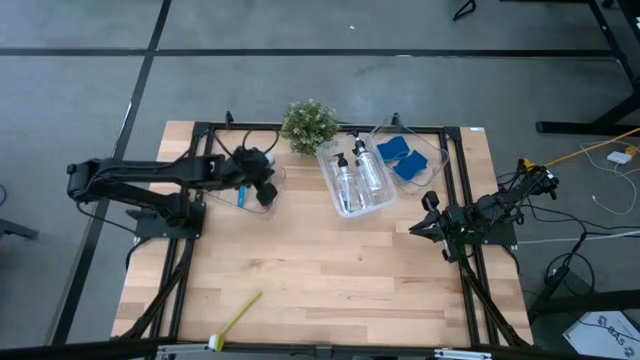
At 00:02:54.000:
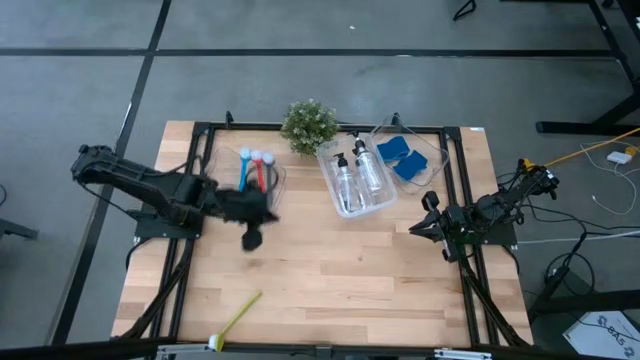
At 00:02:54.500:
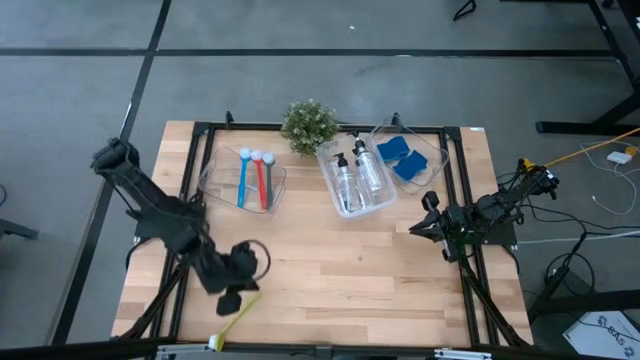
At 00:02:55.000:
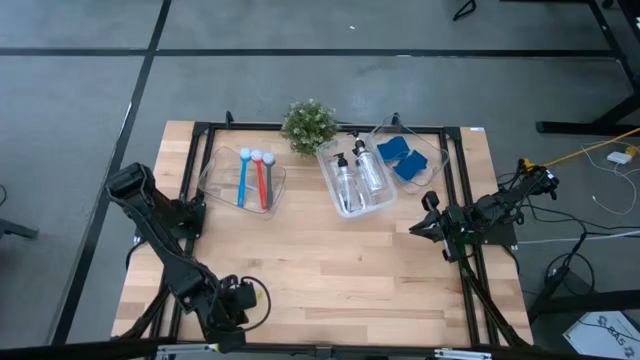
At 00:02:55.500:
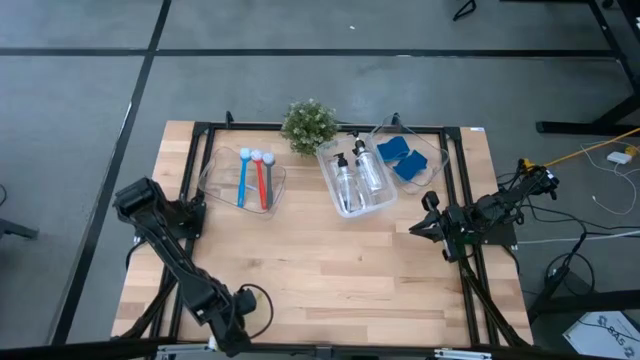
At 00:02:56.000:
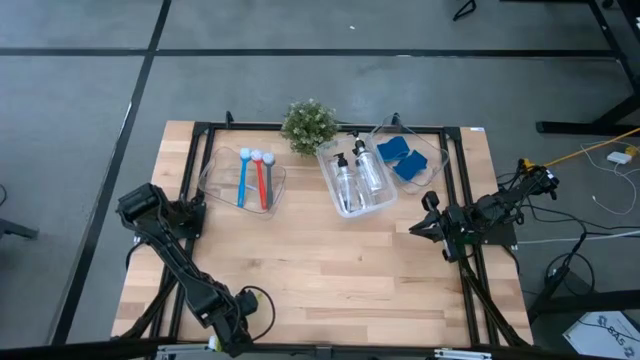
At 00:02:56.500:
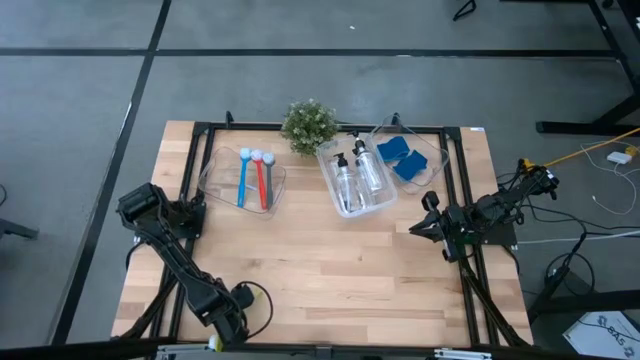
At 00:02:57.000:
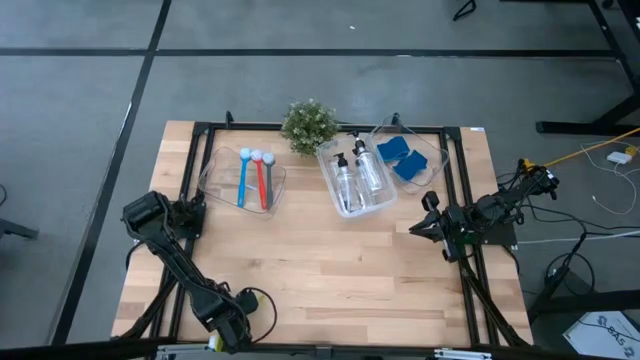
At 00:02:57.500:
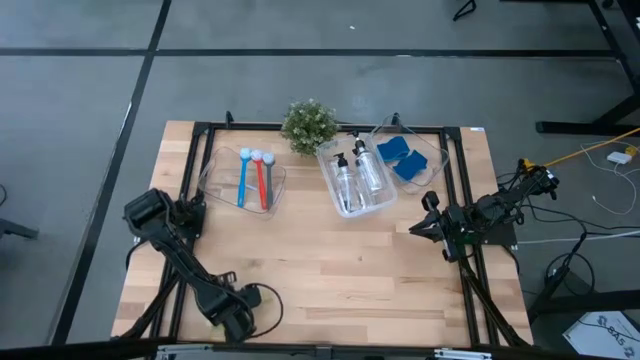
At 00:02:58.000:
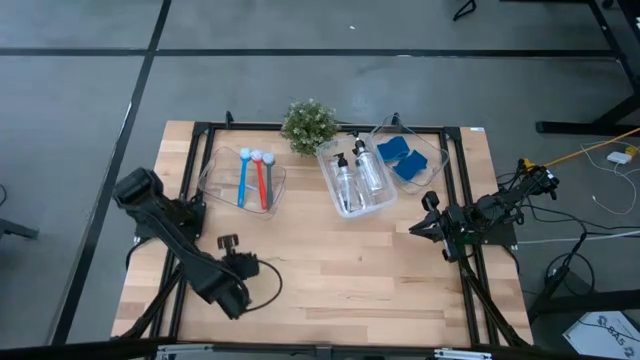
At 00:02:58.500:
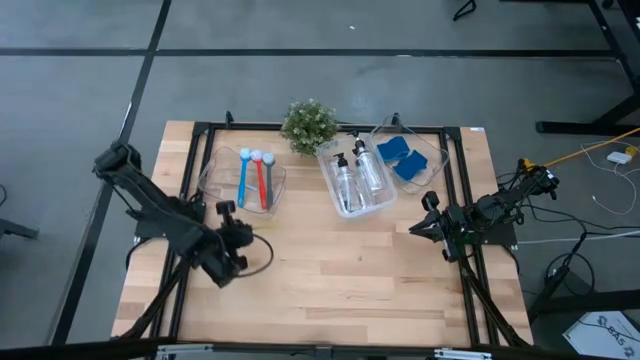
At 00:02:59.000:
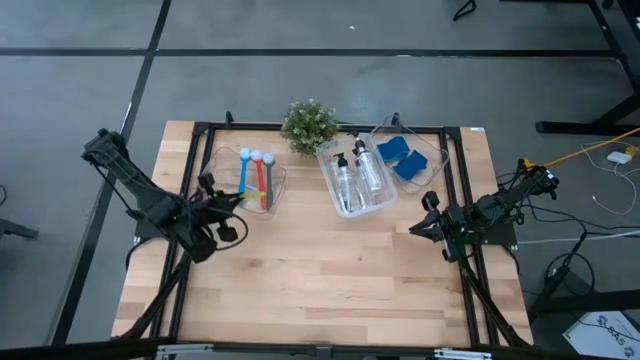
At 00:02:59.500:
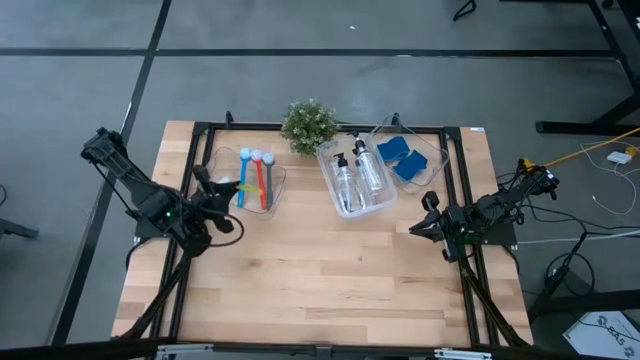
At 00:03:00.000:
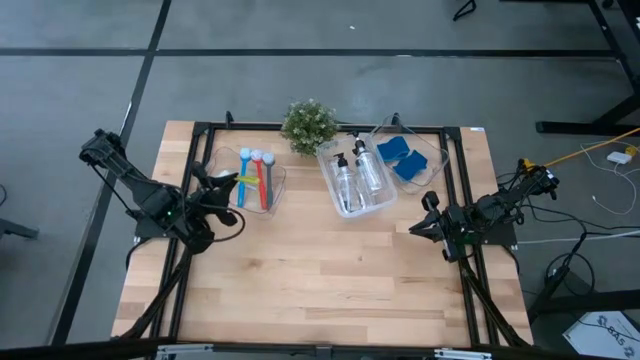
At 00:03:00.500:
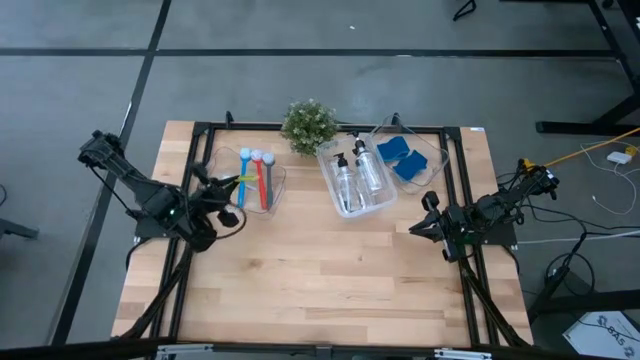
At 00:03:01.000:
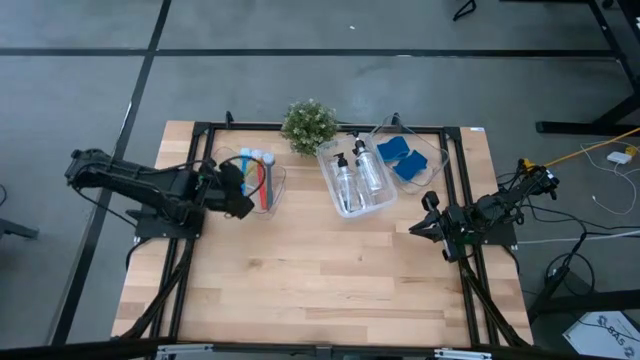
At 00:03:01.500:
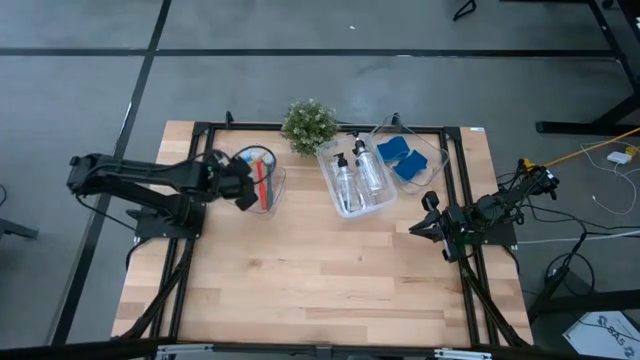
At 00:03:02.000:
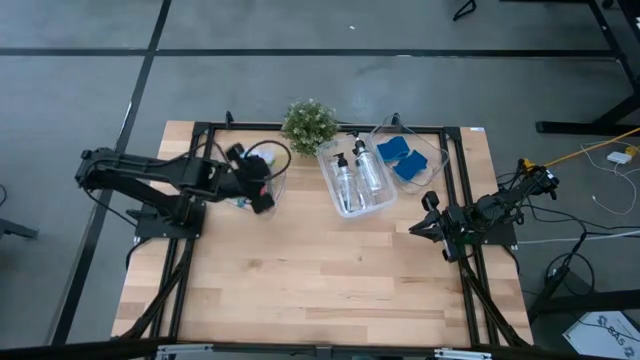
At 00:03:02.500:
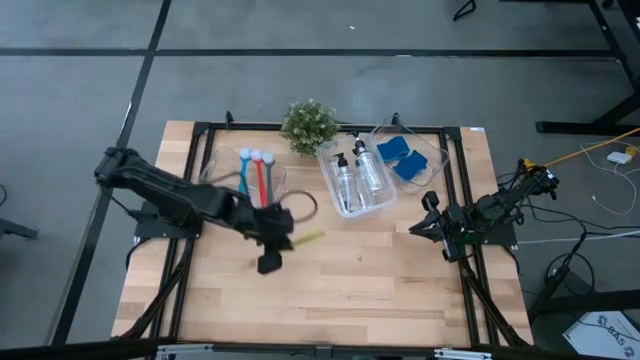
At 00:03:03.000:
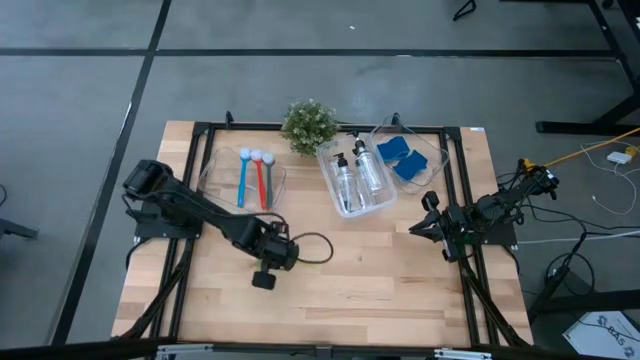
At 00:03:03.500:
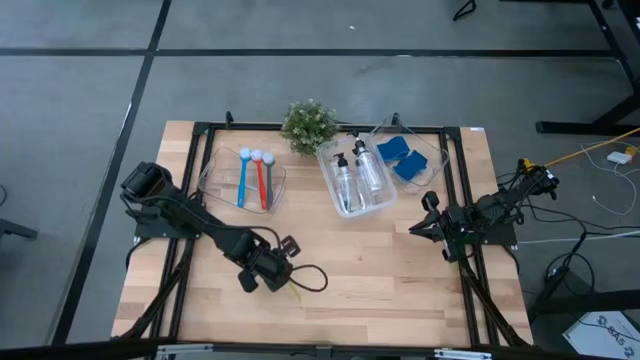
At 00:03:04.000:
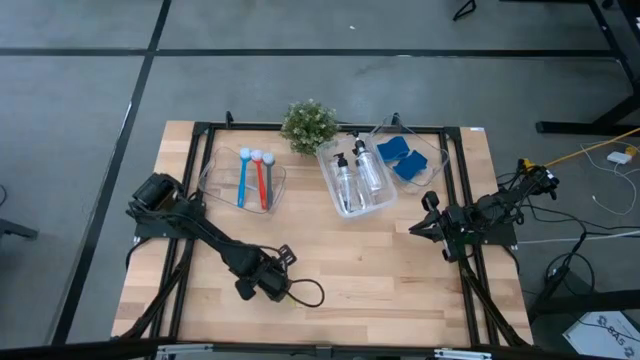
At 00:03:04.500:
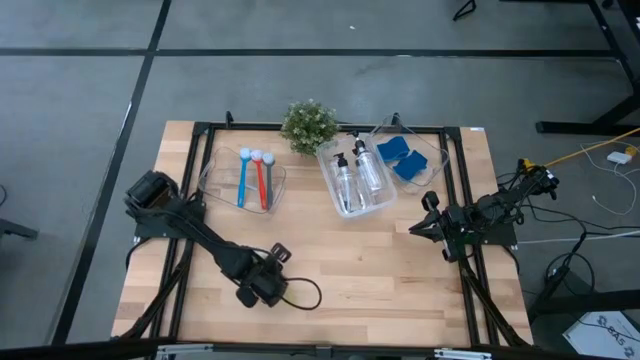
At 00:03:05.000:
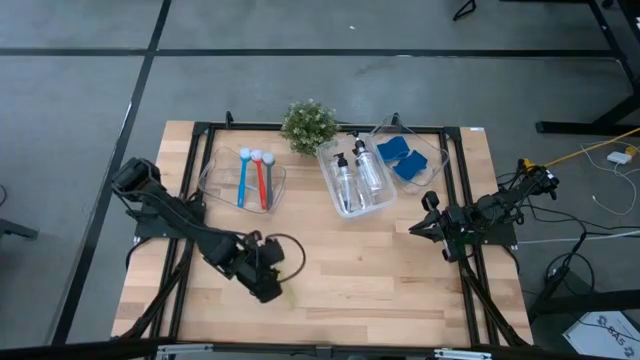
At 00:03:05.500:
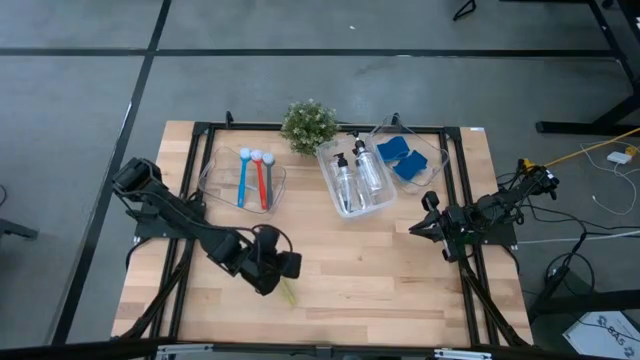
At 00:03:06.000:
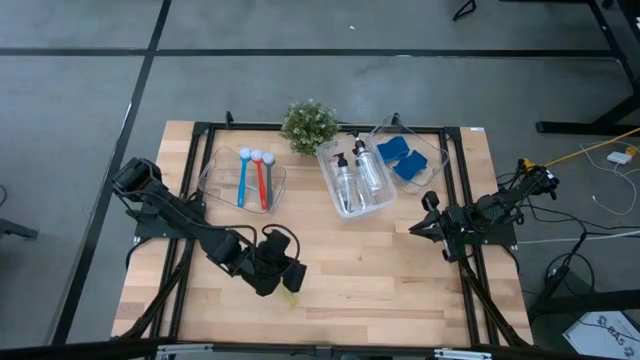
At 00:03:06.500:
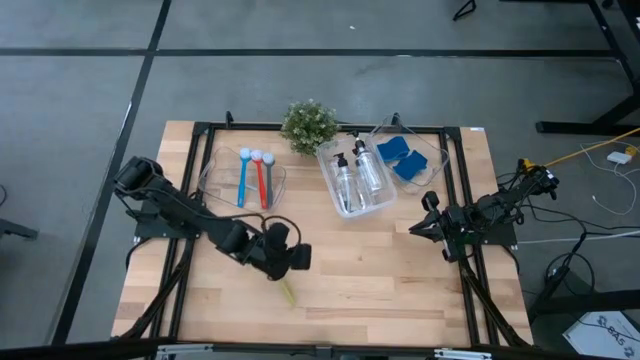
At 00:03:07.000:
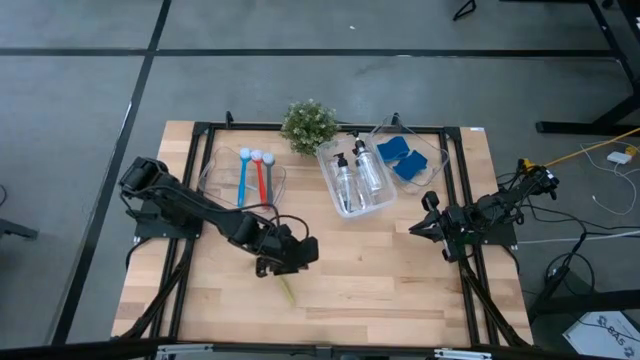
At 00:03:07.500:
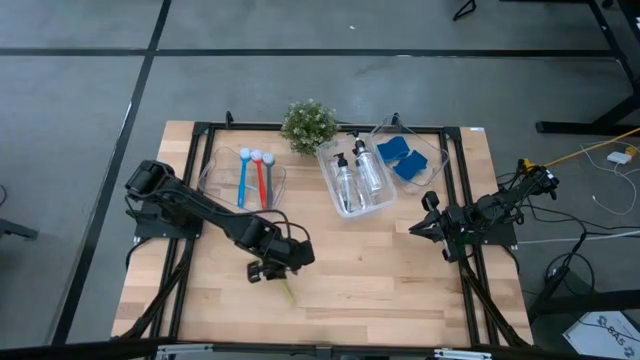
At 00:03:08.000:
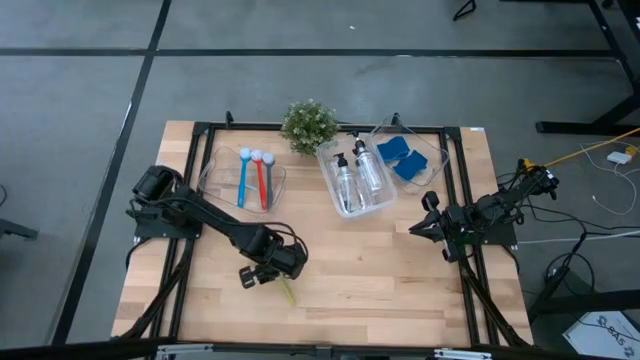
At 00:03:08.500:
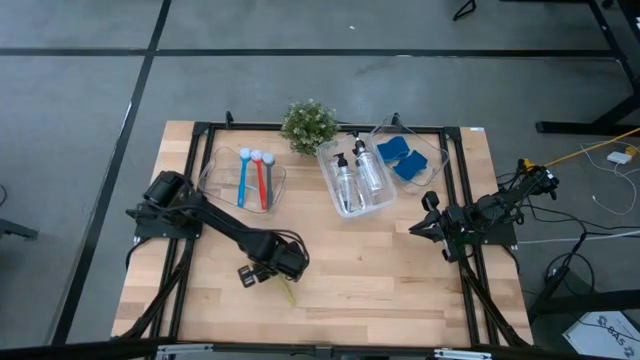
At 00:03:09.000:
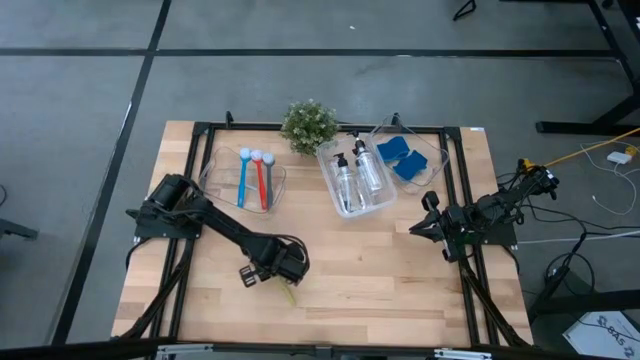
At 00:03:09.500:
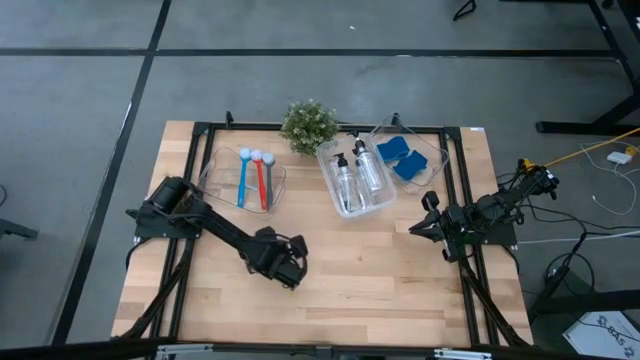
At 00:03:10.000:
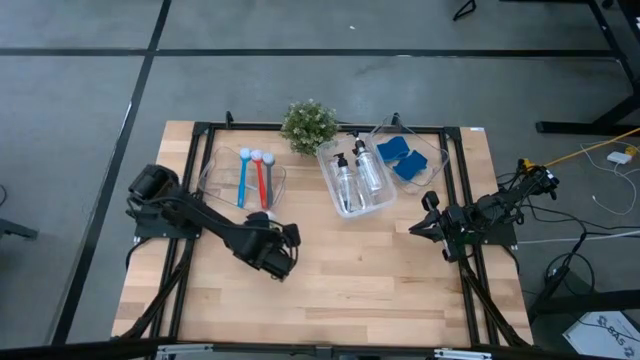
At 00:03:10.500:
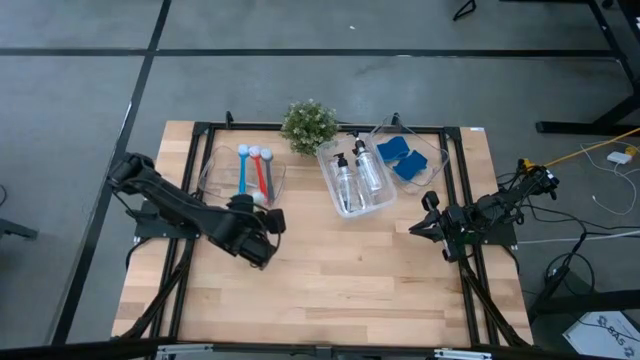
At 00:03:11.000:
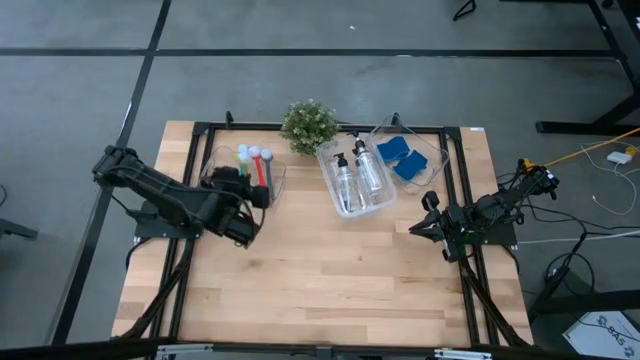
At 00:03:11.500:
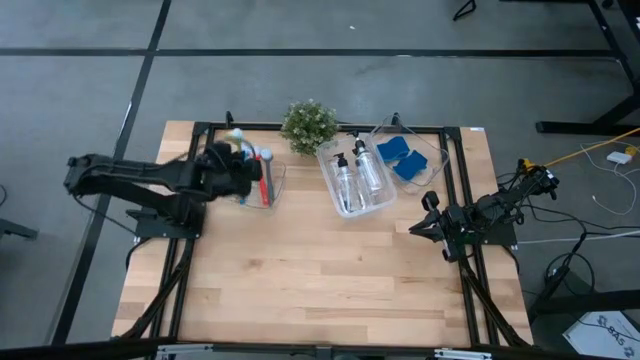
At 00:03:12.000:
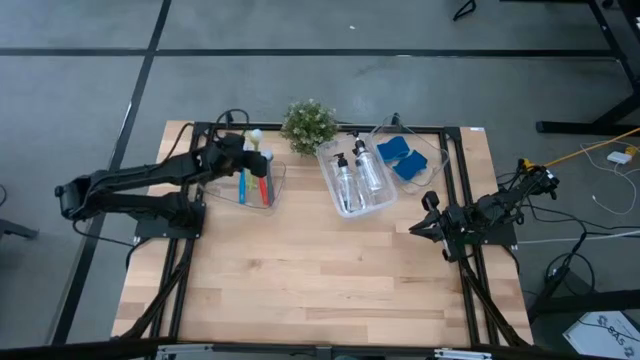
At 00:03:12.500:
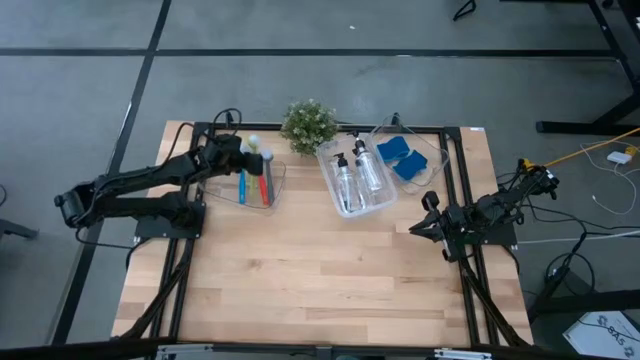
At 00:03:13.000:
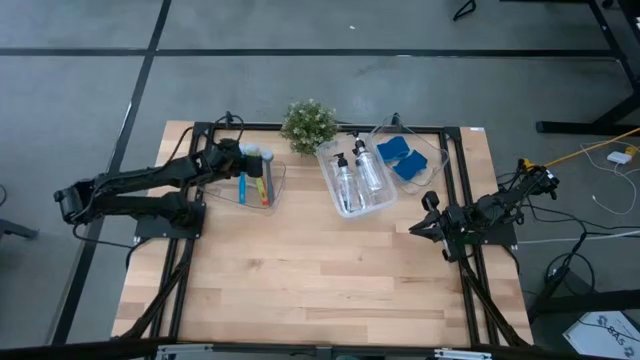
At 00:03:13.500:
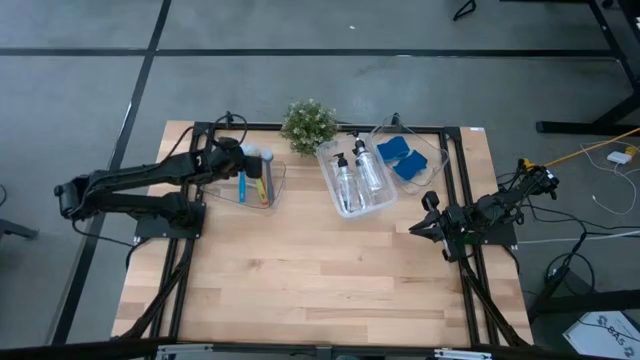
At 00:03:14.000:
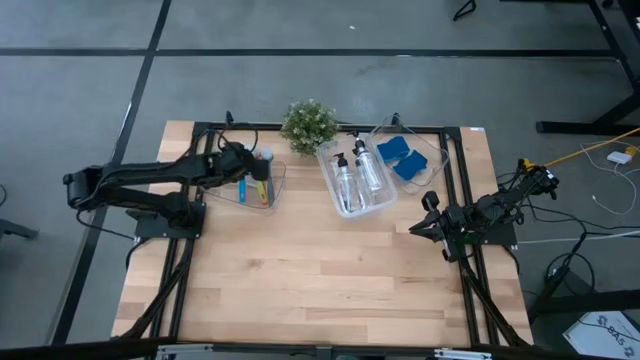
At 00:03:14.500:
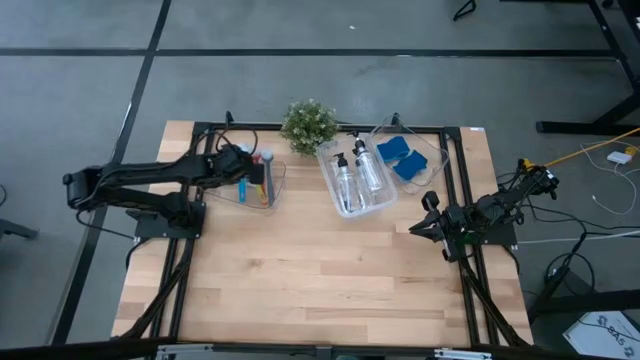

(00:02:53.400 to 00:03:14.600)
Task: Pick & Place Kitchen Sink Supplies
Put the light green dish brush into the left transparent bin
